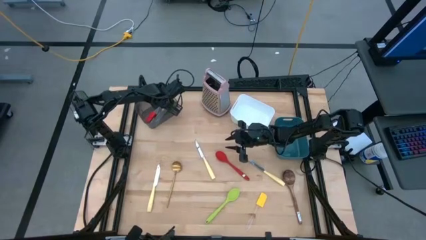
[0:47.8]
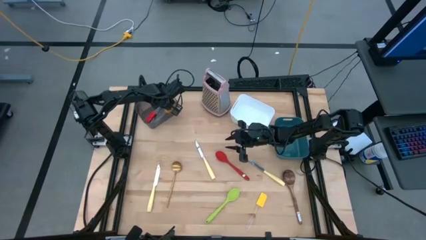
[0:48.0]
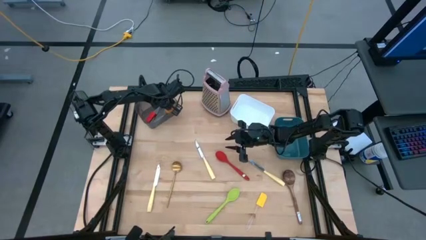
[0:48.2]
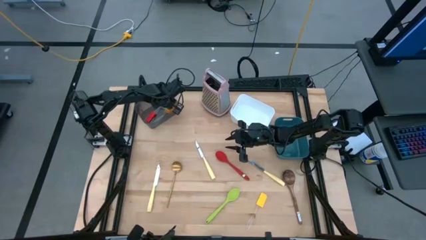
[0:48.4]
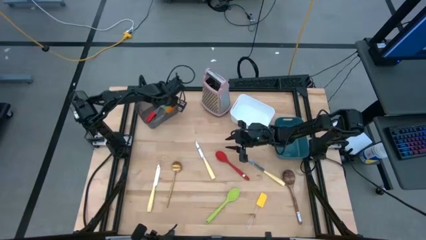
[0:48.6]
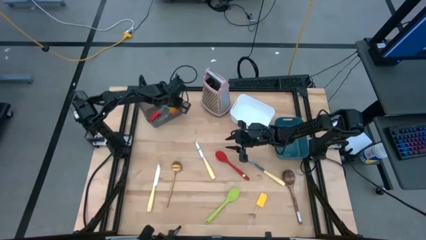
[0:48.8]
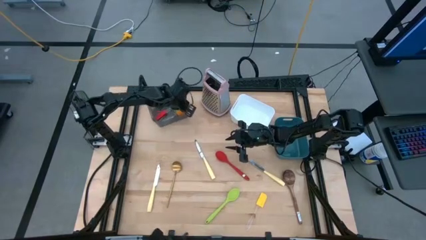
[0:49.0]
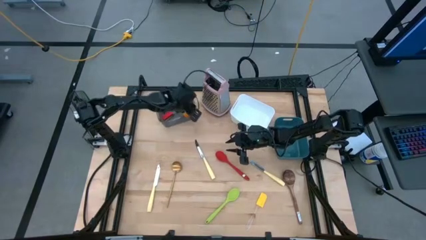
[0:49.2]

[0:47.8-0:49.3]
Task: Pick & Place Kitchen Items
Adjust the black bin

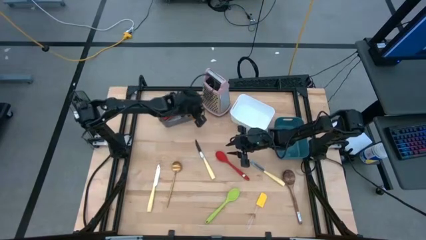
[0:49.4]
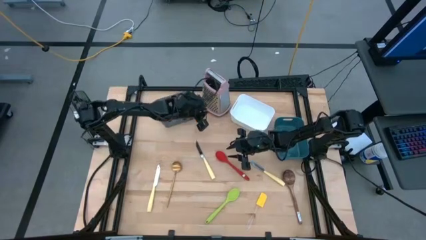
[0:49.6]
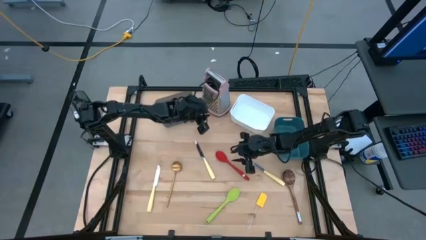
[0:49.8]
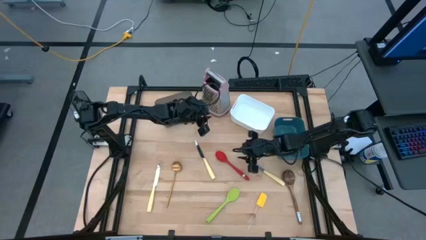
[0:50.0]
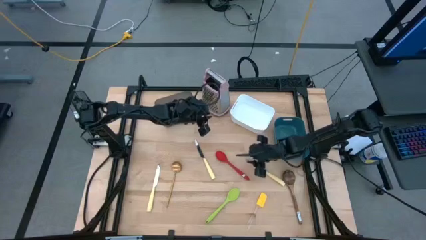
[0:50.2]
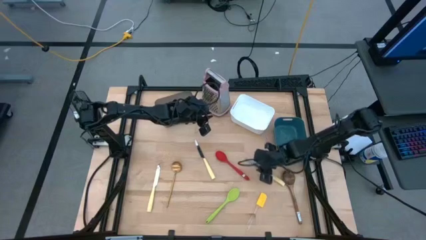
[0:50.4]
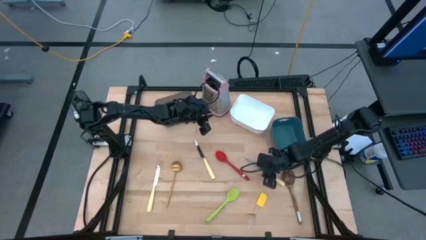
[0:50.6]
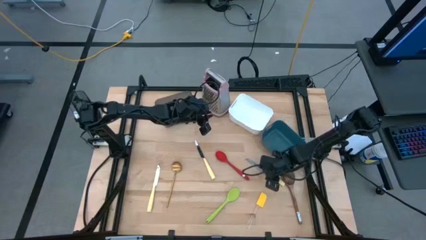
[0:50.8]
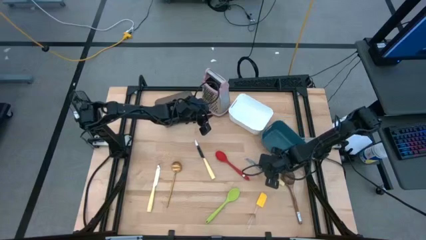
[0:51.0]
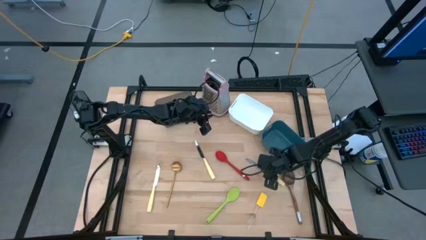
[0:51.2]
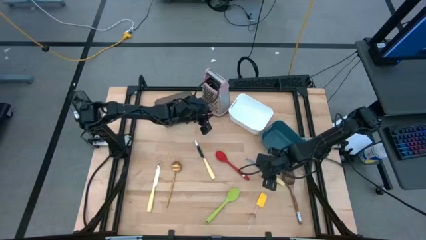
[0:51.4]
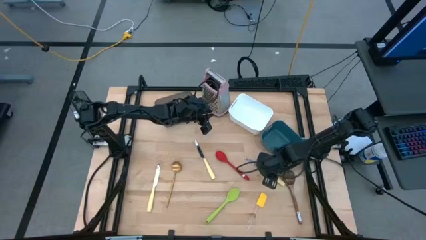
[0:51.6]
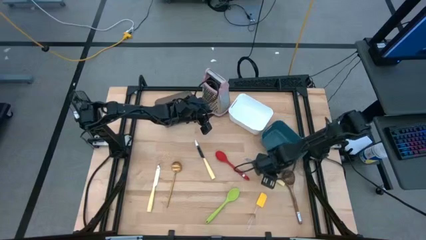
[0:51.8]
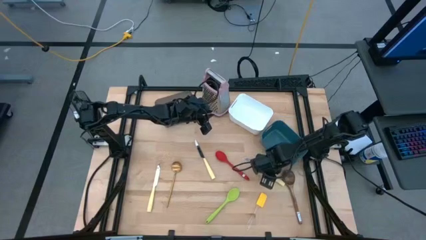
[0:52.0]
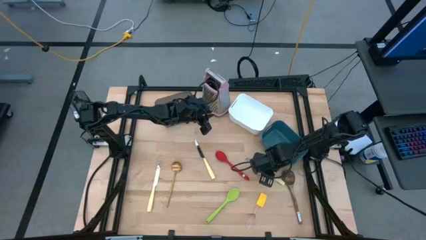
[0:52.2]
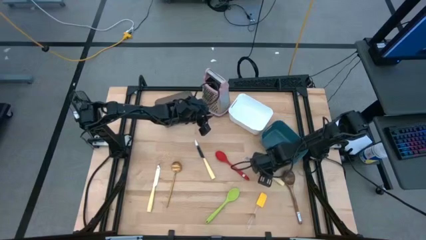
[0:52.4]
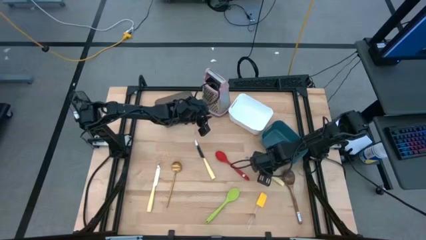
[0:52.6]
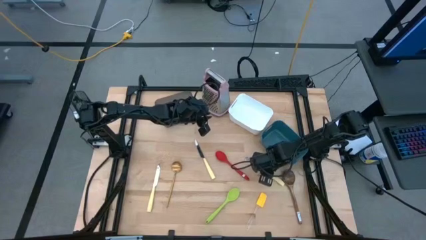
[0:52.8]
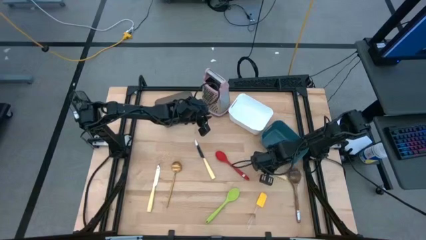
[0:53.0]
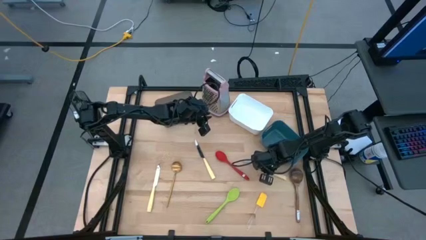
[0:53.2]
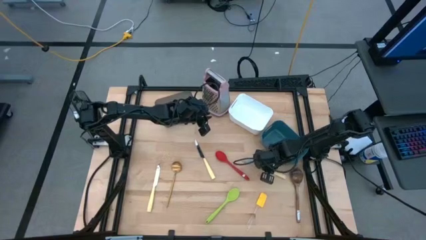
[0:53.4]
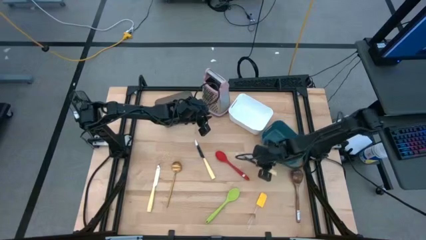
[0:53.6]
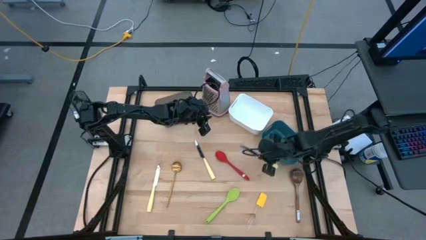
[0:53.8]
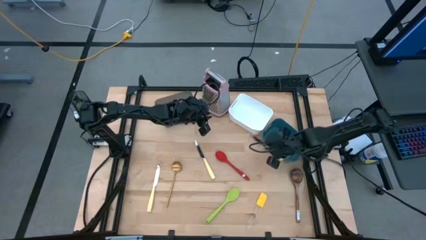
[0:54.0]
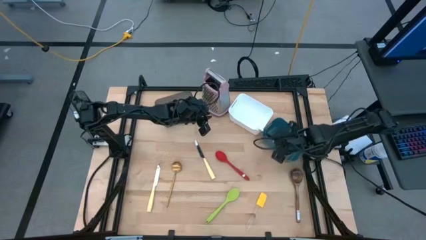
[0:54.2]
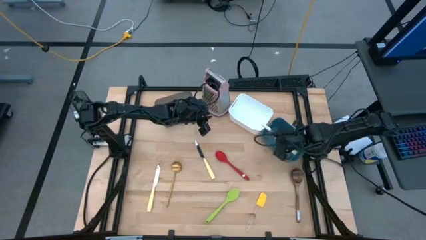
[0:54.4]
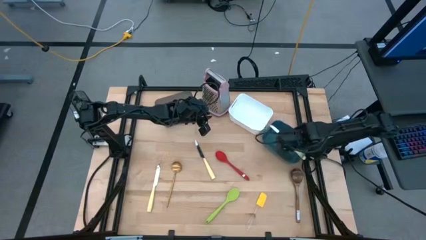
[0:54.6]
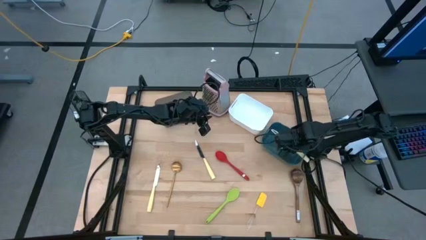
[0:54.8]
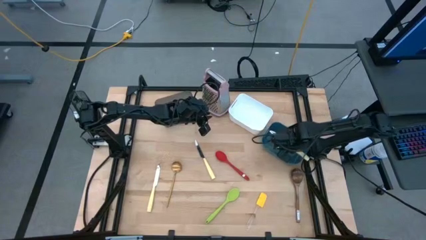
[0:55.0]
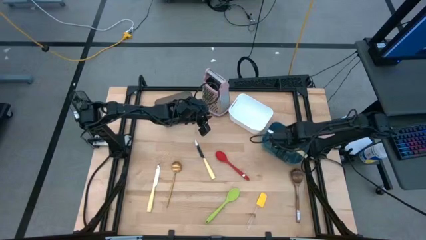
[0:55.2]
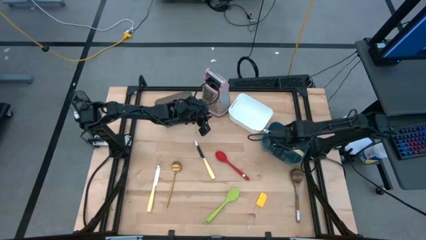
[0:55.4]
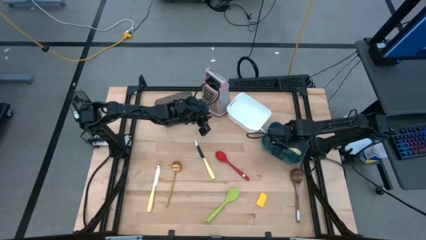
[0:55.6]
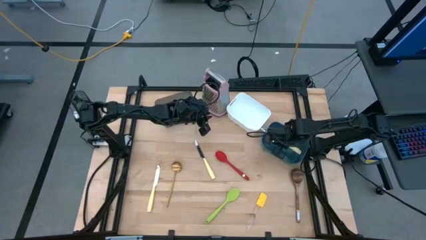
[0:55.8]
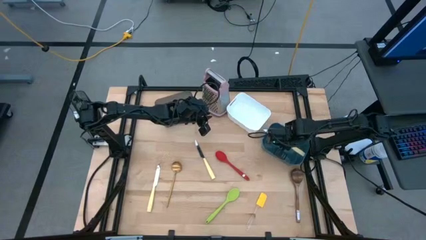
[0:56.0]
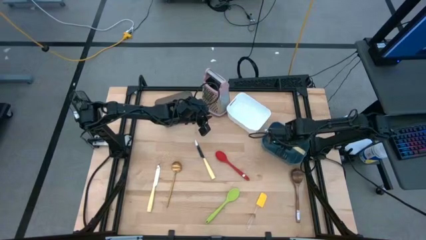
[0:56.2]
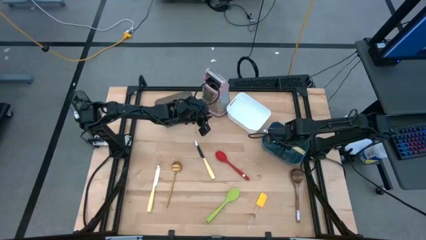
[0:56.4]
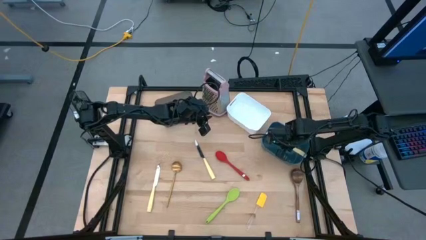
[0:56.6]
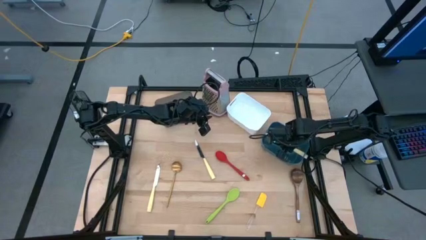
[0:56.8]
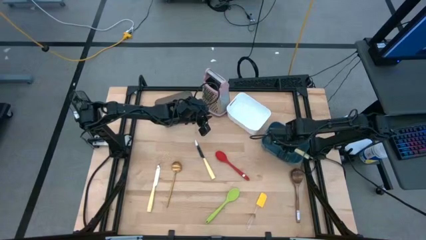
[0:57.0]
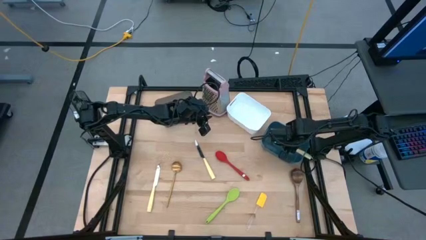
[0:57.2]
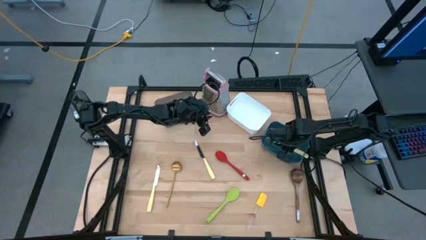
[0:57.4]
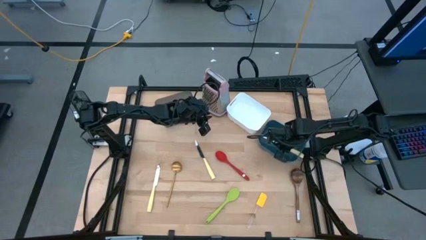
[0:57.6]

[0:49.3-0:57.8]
Put the right yellow table knife into the blue bin
